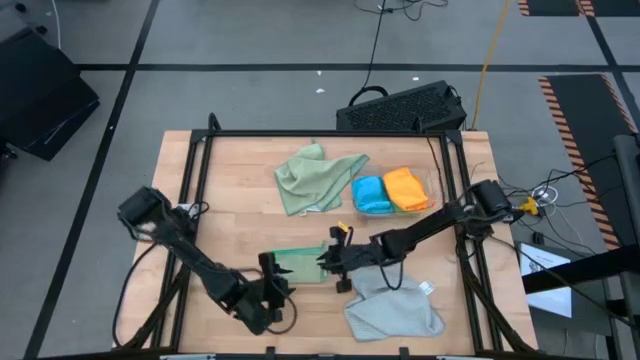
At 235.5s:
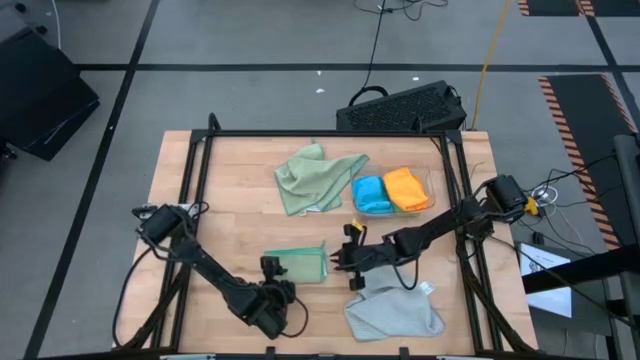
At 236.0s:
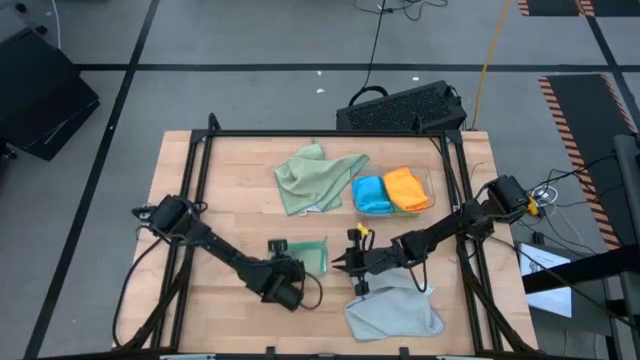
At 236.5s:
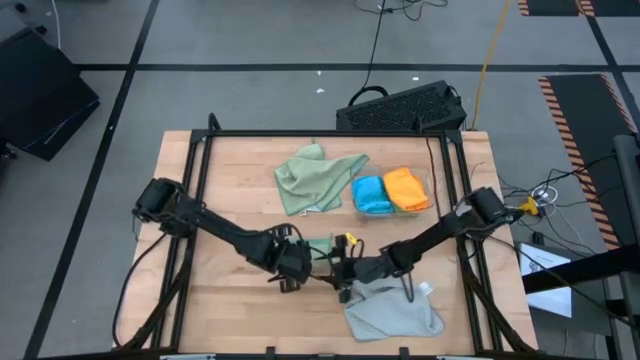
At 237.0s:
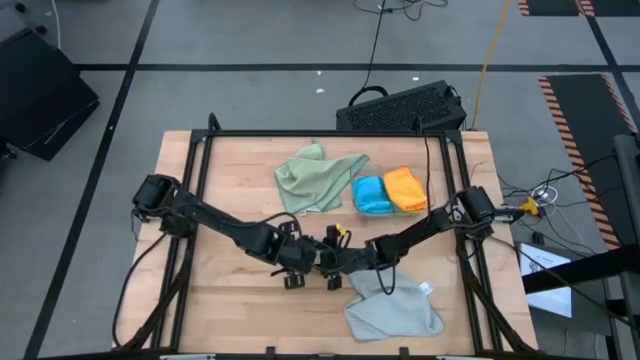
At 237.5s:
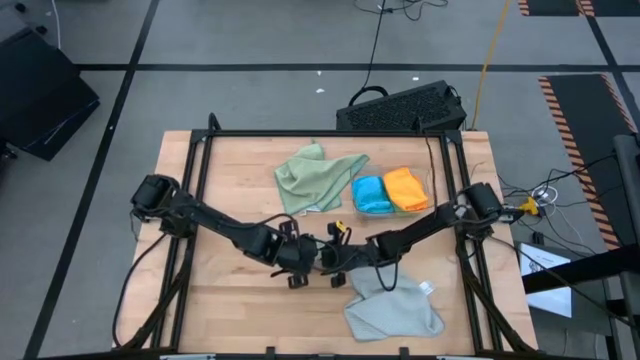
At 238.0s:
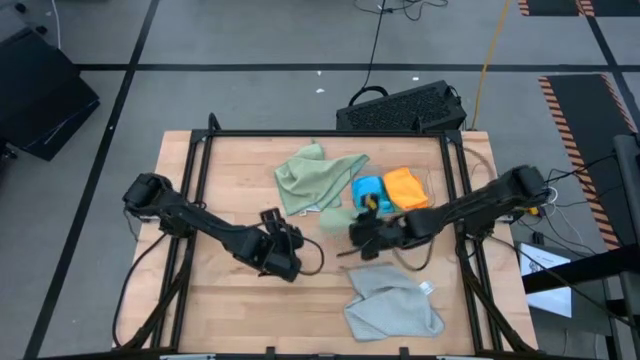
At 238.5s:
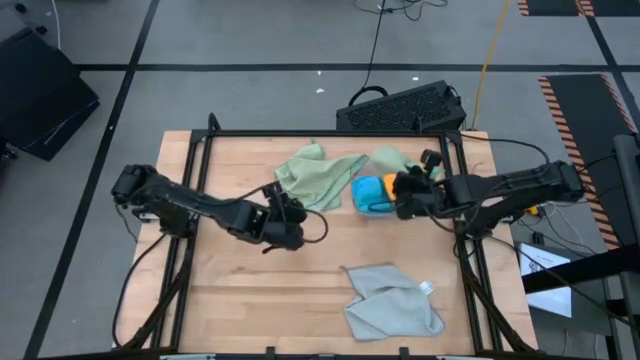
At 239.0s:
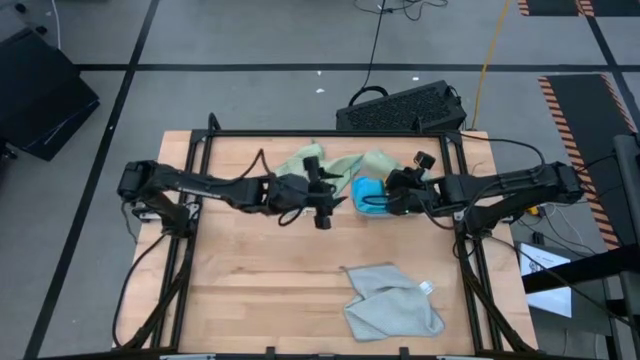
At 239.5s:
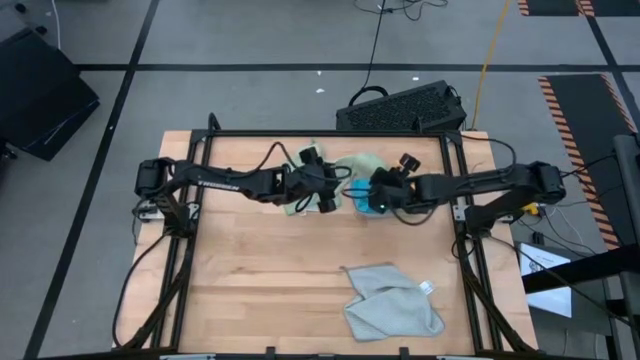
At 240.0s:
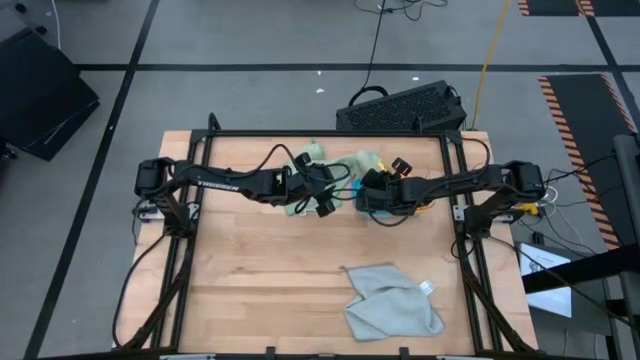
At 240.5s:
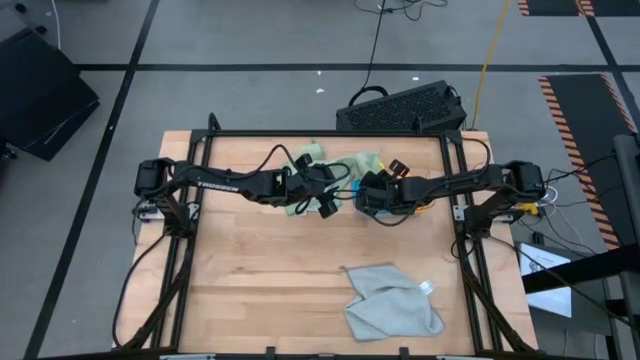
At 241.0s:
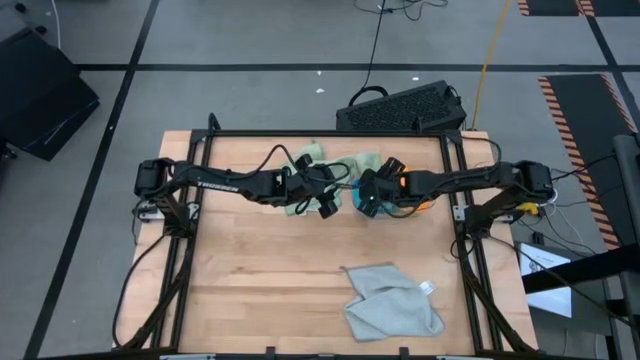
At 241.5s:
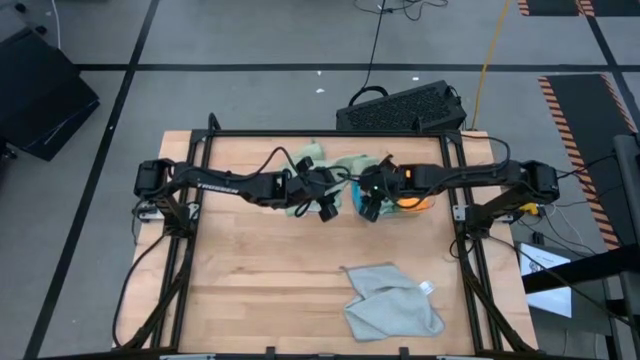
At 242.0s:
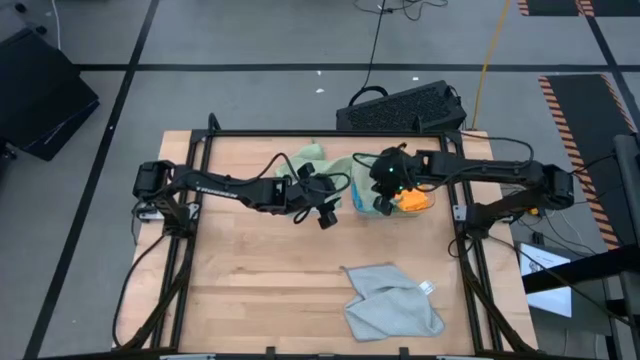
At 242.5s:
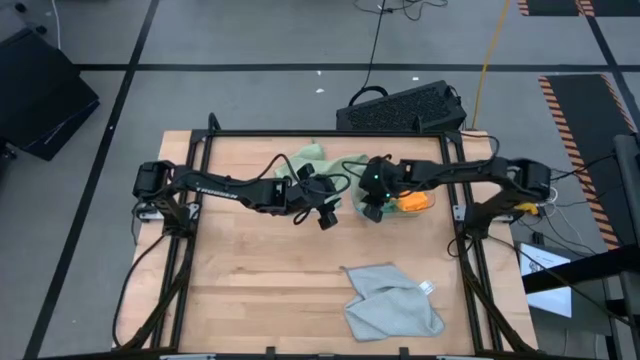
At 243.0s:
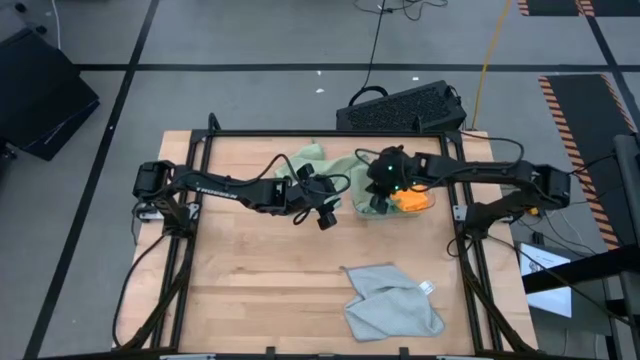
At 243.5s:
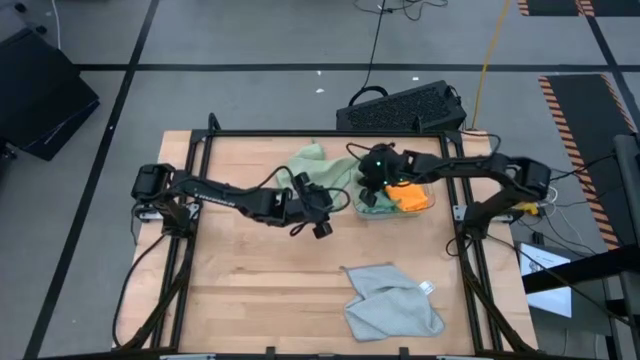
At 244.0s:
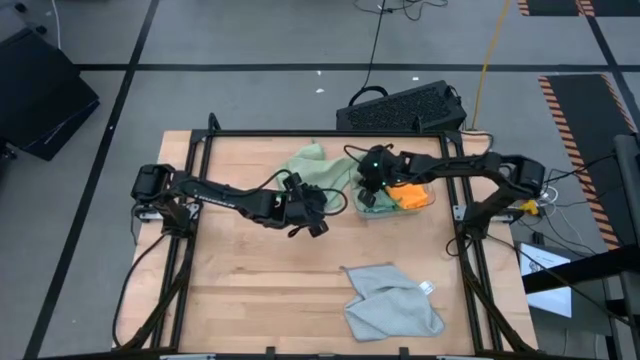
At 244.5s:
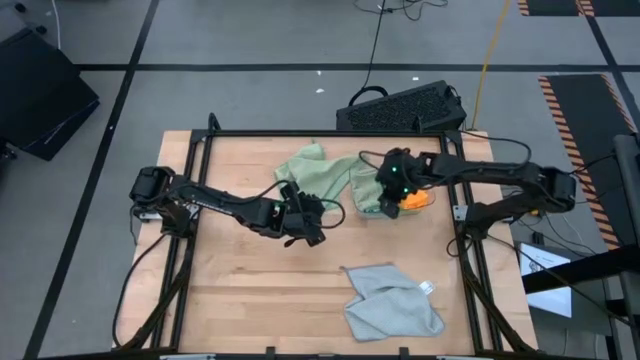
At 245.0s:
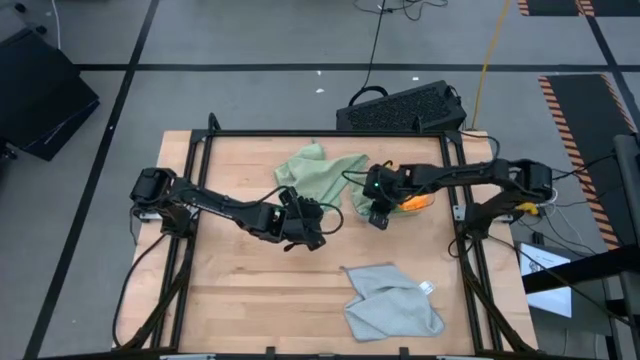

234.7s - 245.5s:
Task: Fold microfiber towels
Put the folded light green microfiber cloth into the transparent bin

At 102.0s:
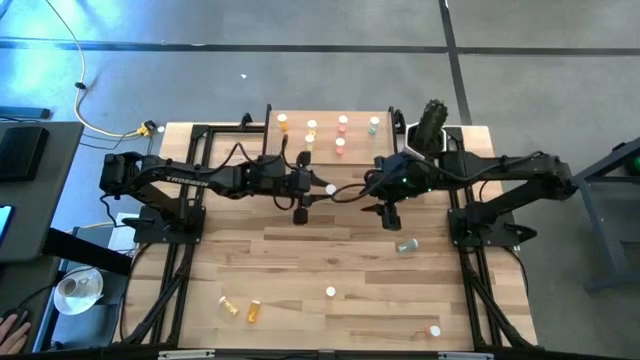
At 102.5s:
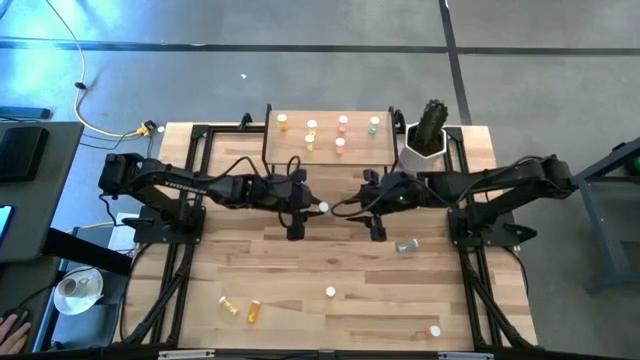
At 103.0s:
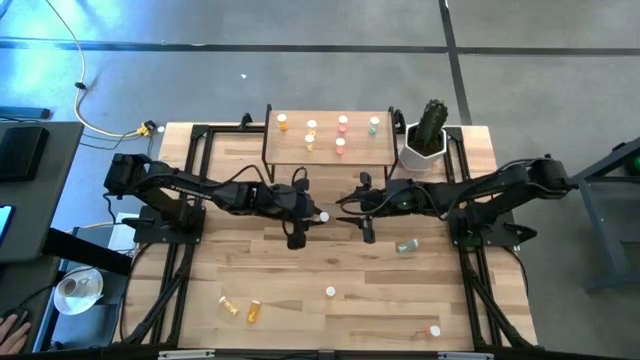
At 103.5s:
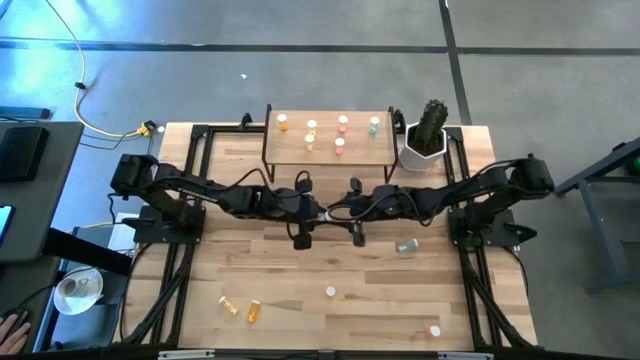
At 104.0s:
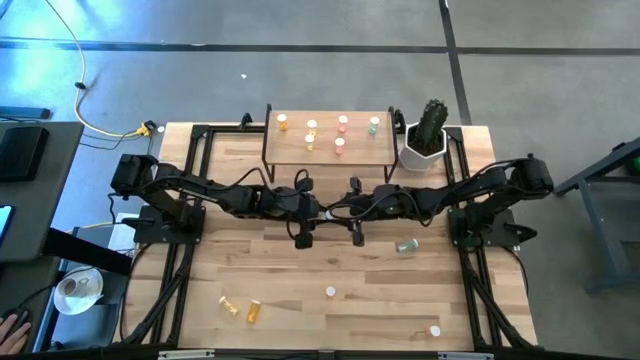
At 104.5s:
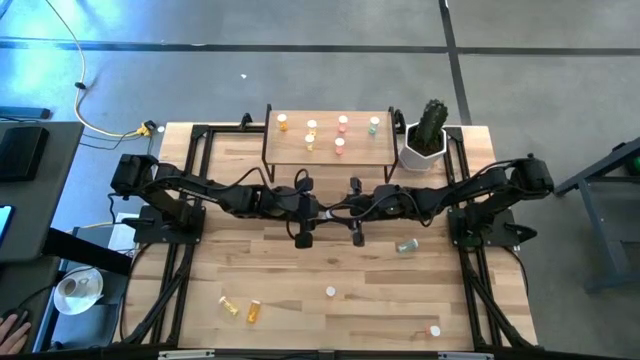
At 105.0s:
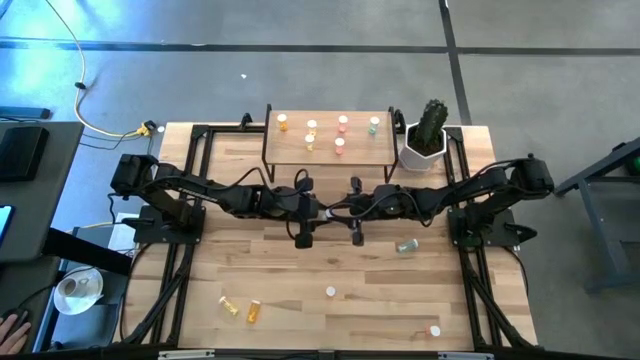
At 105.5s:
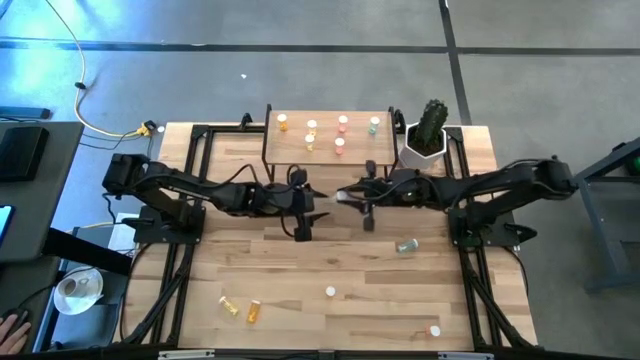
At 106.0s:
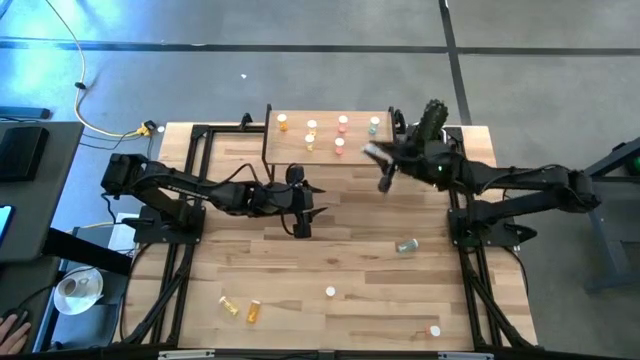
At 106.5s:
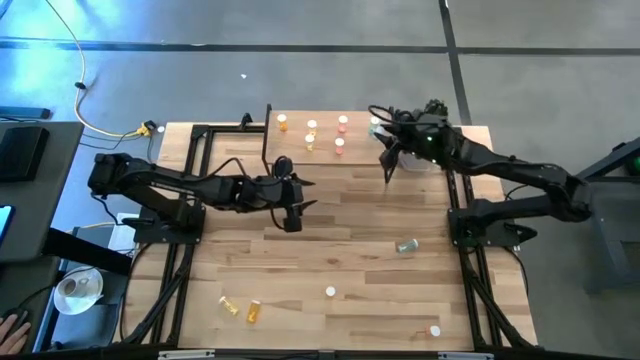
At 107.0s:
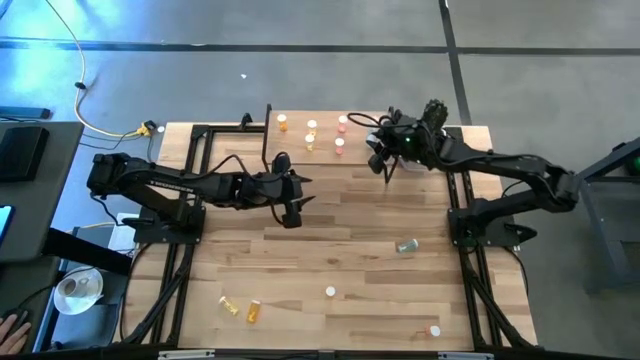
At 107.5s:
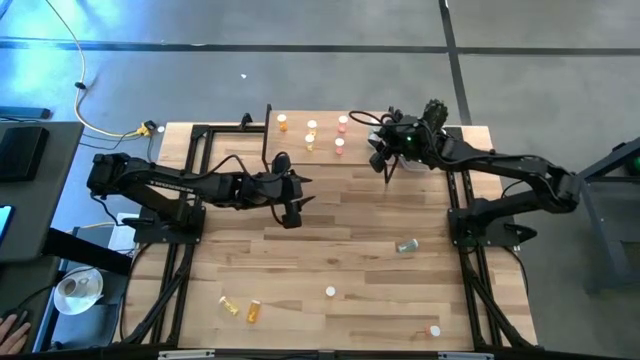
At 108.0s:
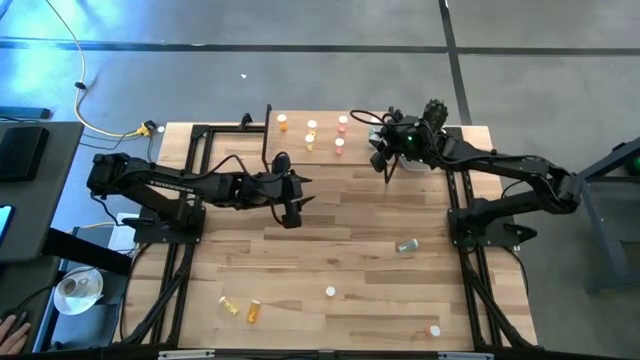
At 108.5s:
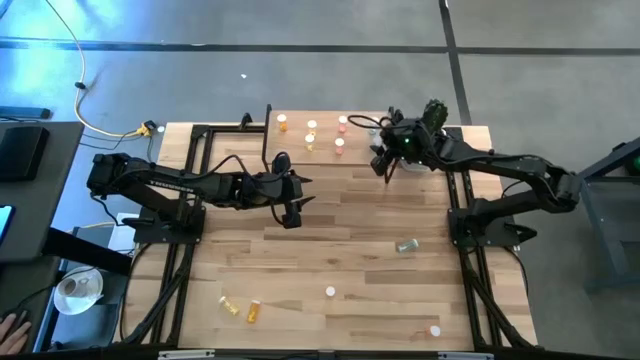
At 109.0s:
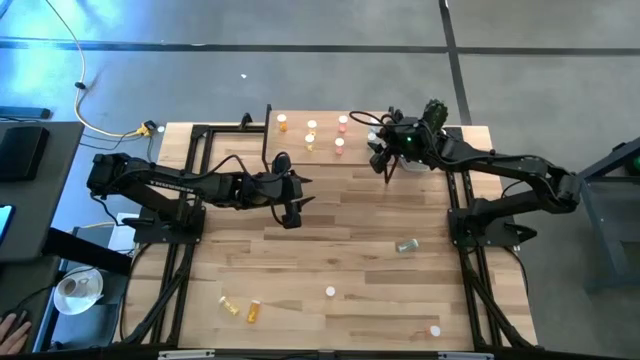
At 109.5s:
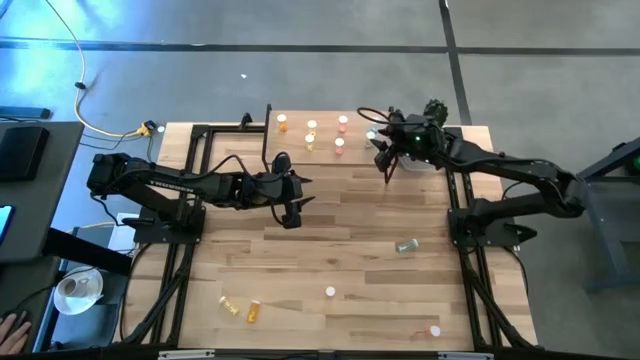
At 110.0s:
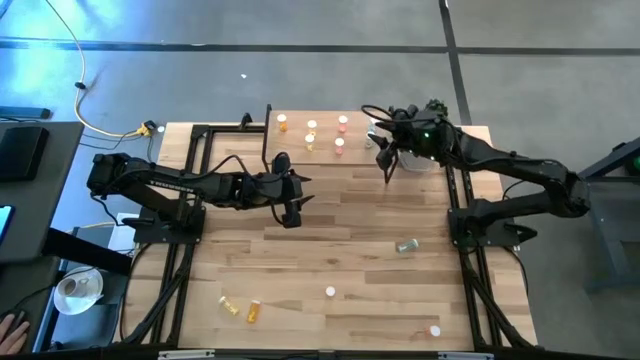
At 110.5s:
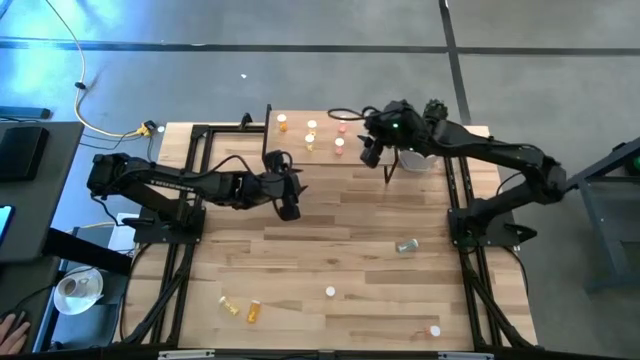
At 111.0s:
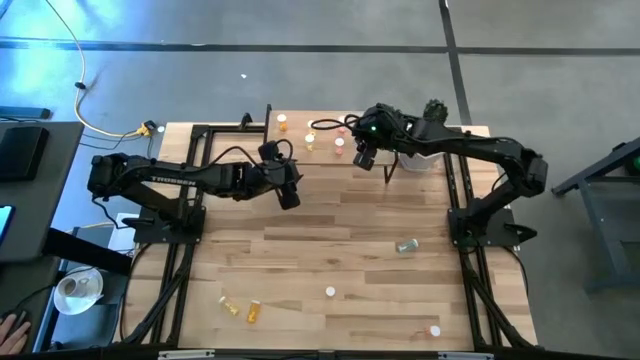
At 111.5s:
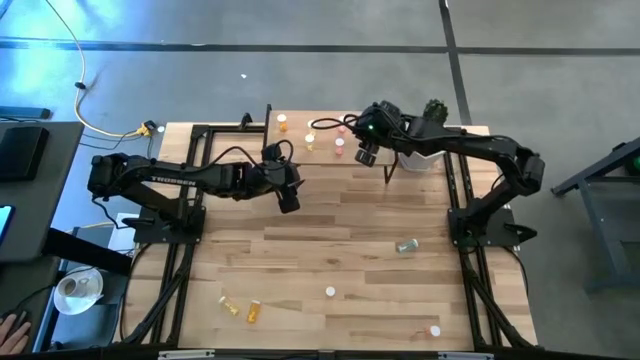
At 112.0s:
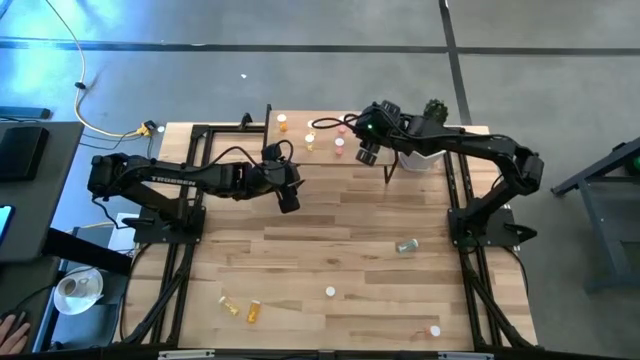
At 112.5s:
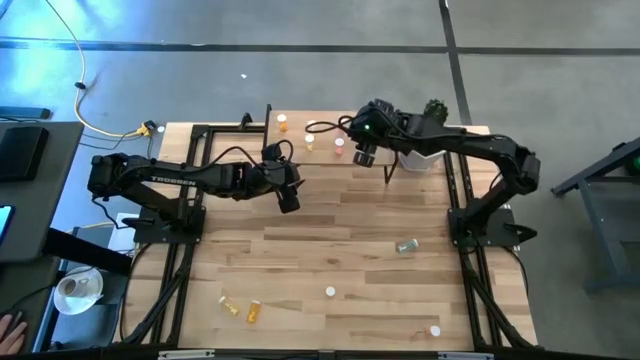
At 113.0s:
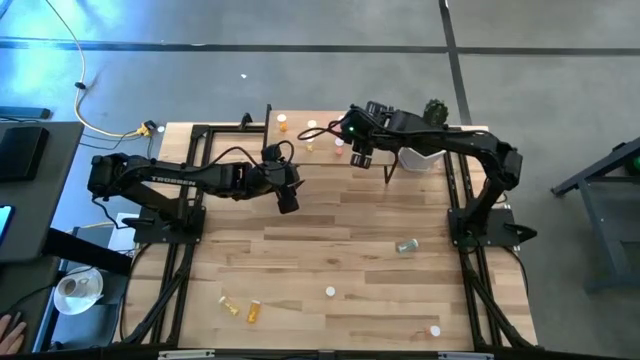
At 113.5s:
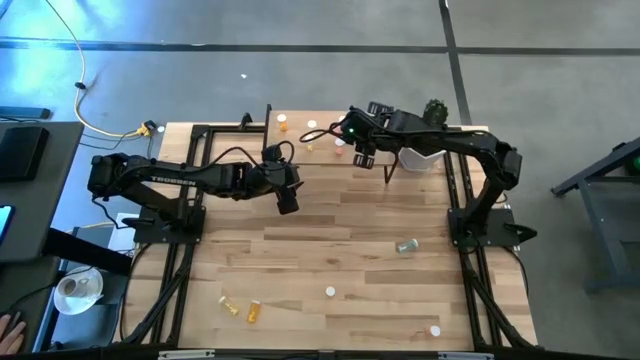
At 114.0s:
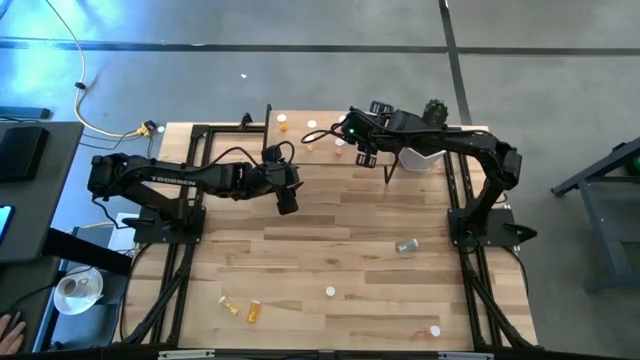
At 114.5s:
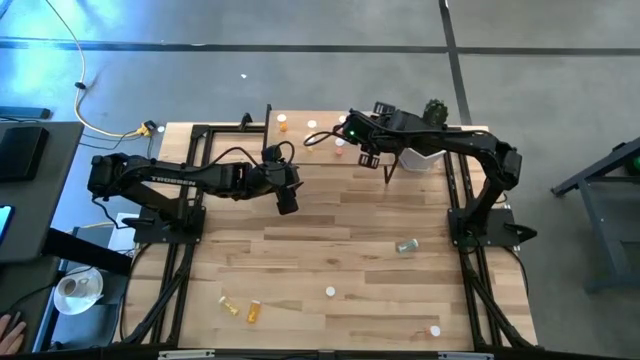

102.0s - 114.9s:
Task: Pick and place medicine bottles onto shelf by color
Put the bottom blue pill bottle on the shelf aligned with the other blue pill bottle
